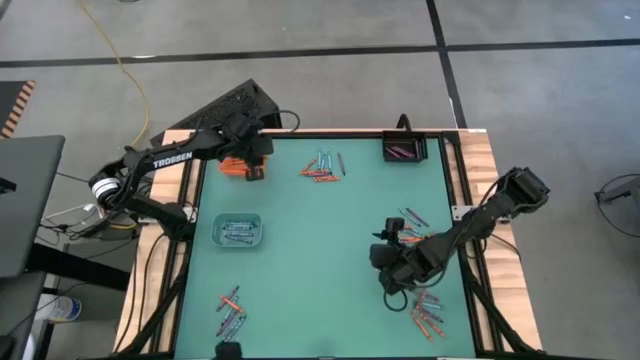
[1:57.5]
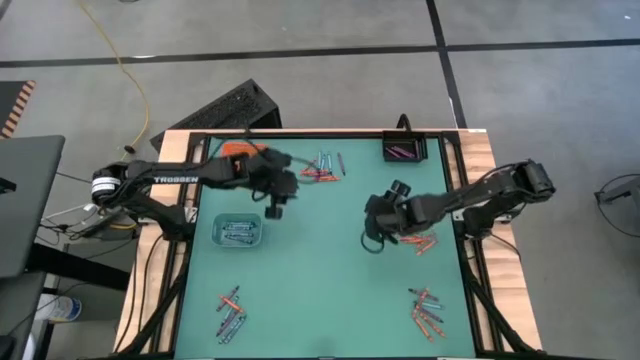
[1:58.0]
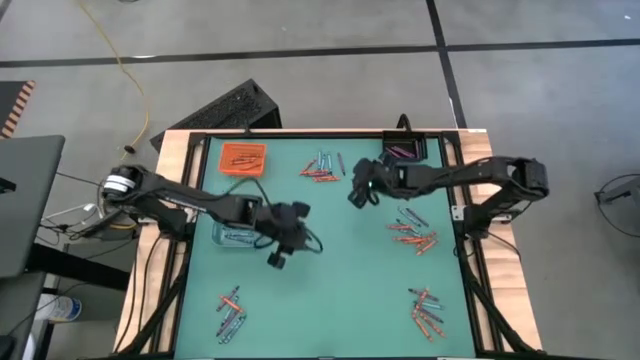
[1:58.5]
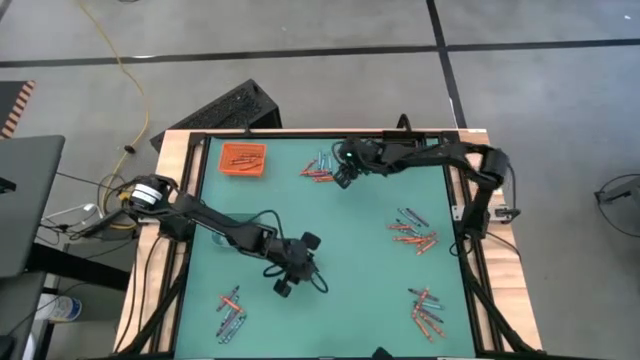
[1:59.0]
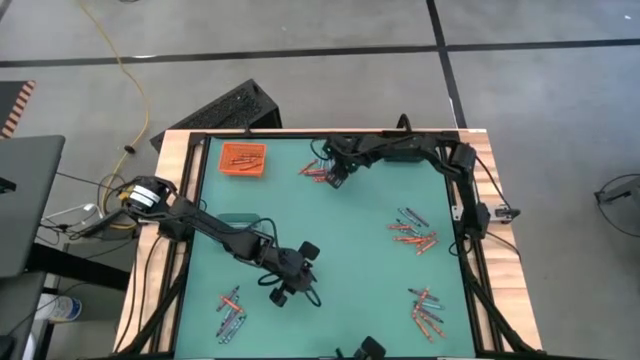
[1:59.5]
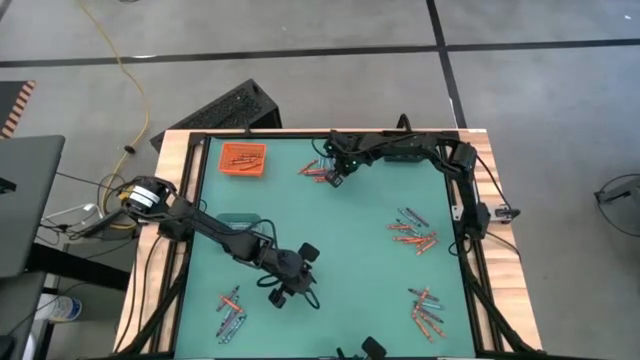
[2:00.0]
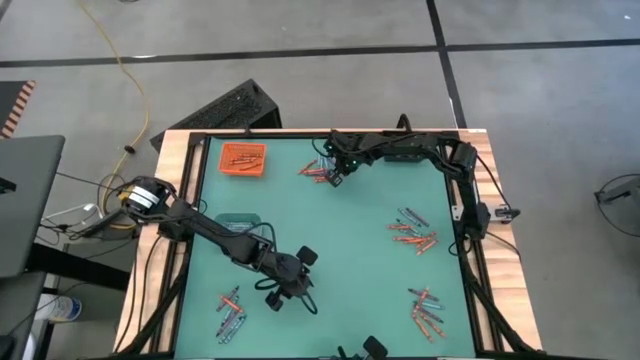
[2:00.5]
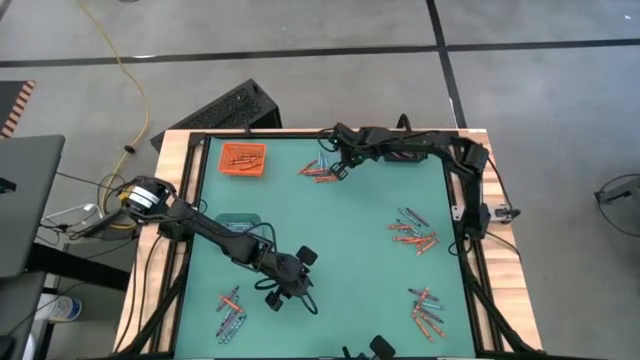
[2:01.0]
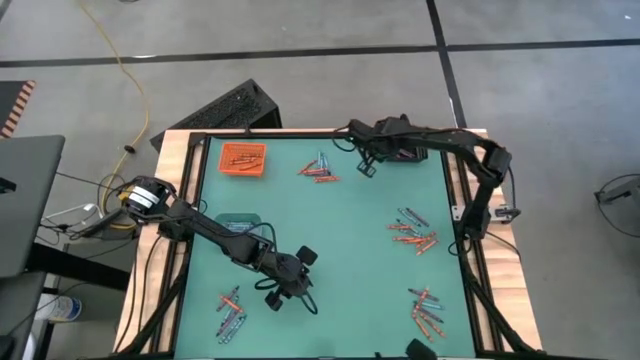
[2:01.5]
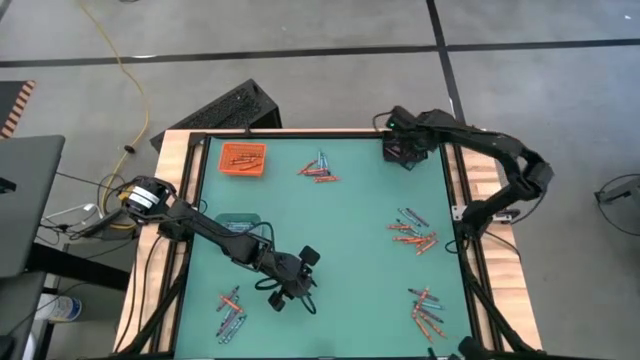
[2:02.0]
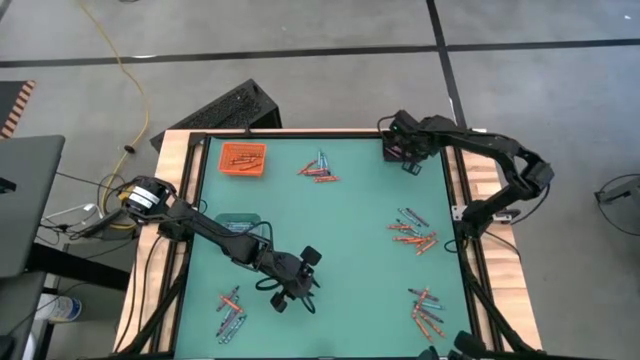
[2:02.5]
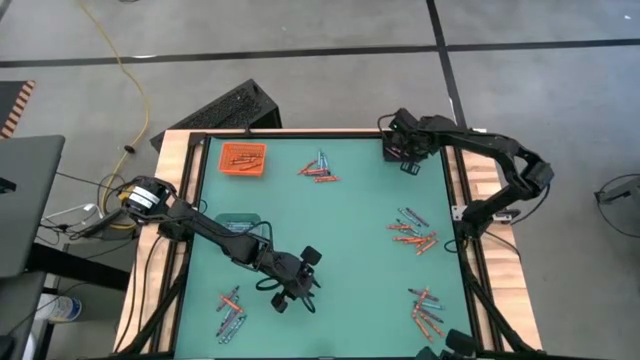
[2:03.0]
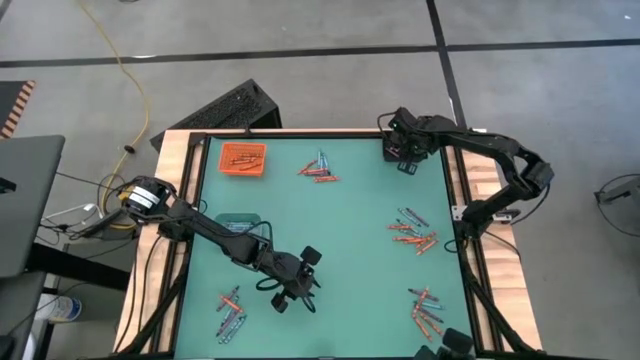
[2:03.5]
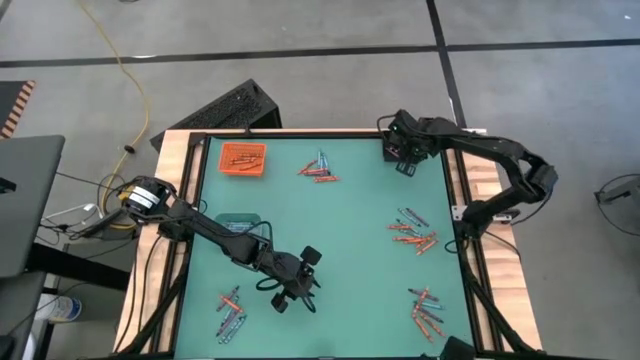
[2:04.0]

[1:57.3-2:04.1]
Task: Sort crayons
Put the purple crayon into the top right black bin

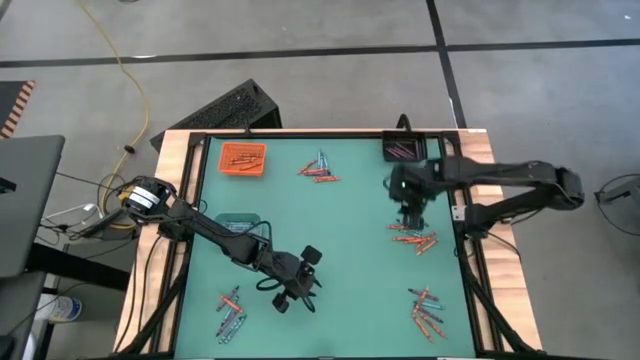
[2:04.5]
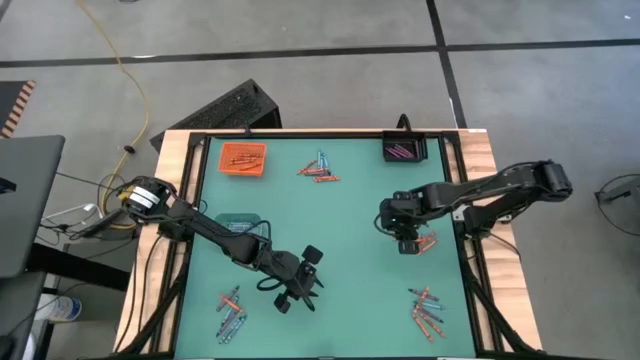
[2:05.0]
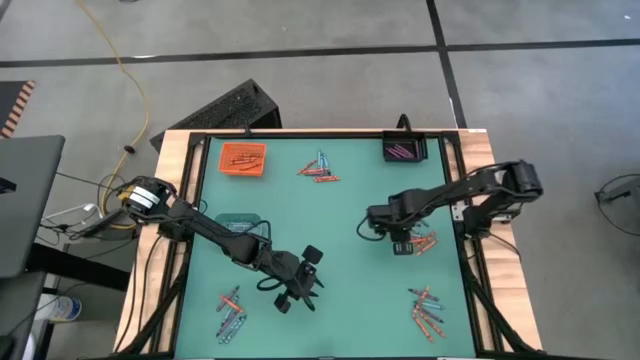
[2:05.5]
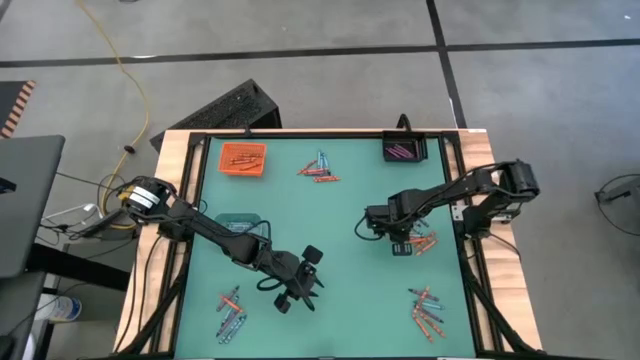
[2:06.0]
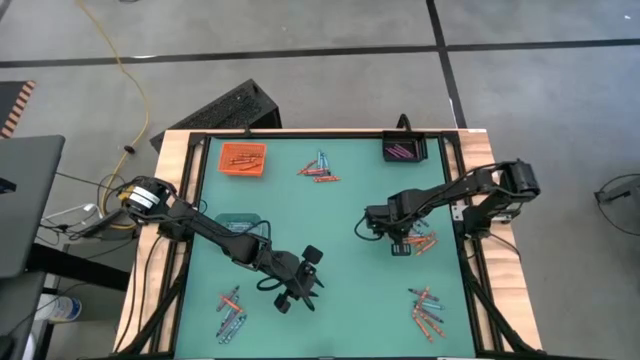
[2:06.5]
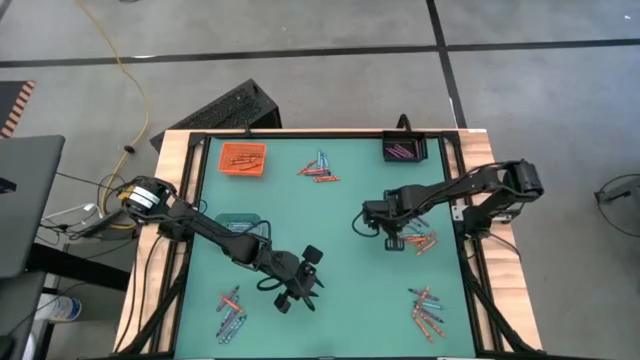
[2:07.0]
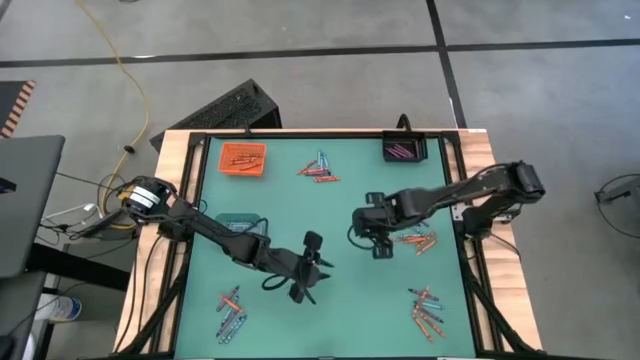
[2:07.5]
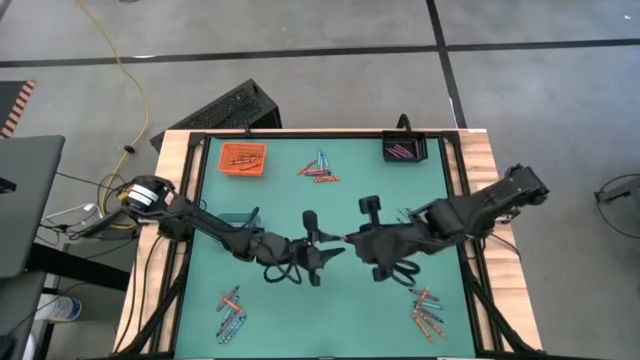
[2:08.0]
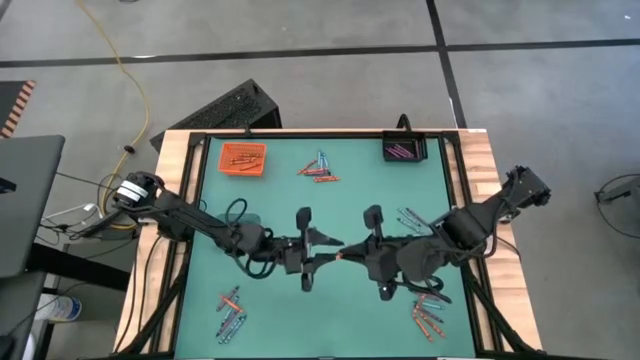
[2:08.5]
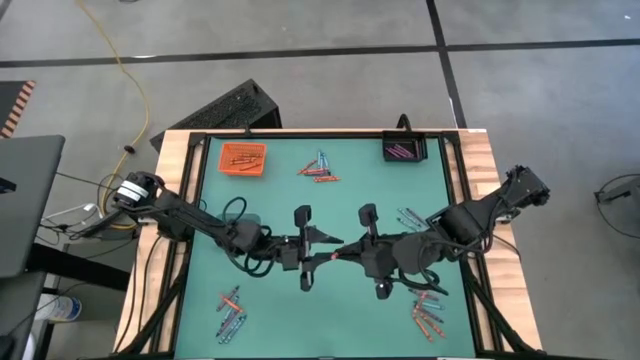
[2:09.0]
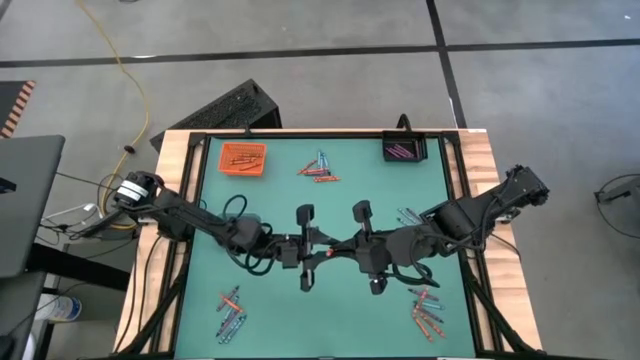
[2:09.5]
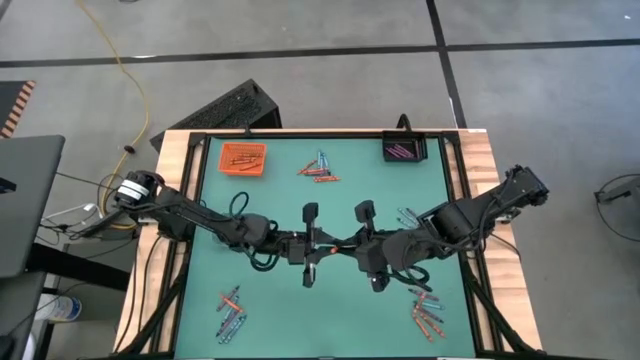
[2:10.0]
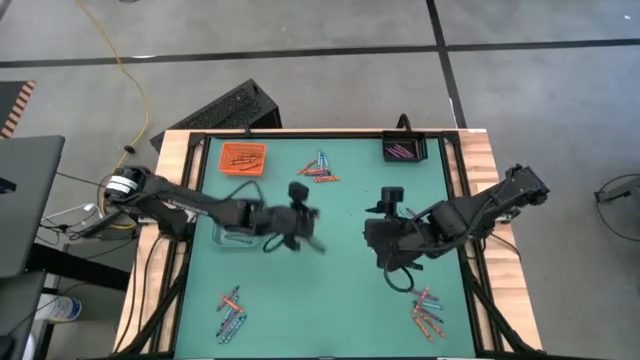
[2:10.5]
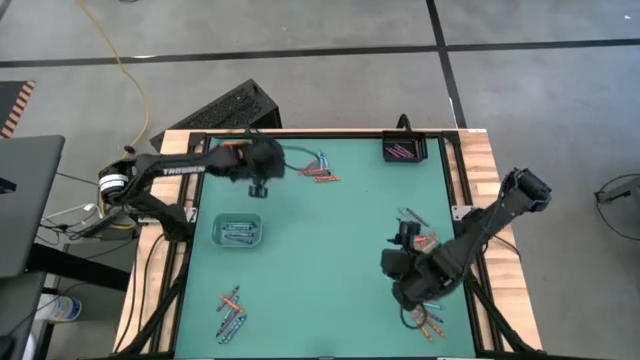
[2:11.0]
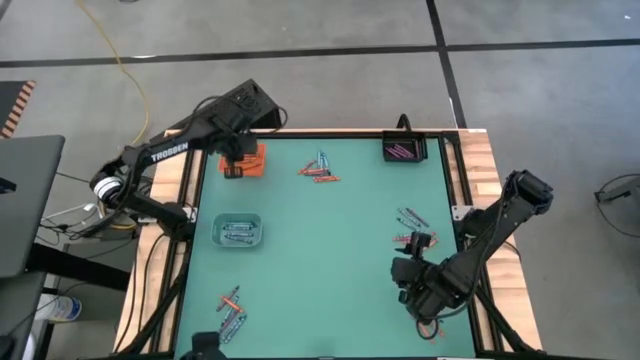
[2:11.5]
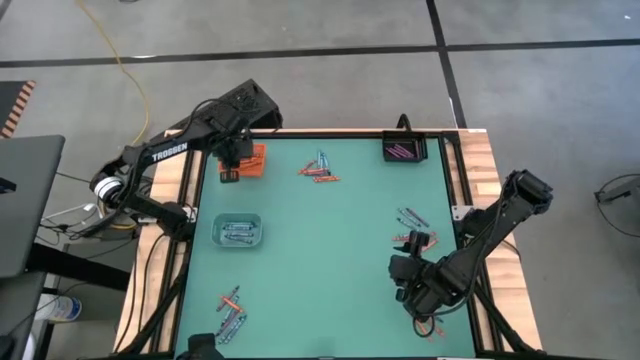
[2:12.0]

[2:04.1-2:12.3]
Put the orange crayon into the orange basket

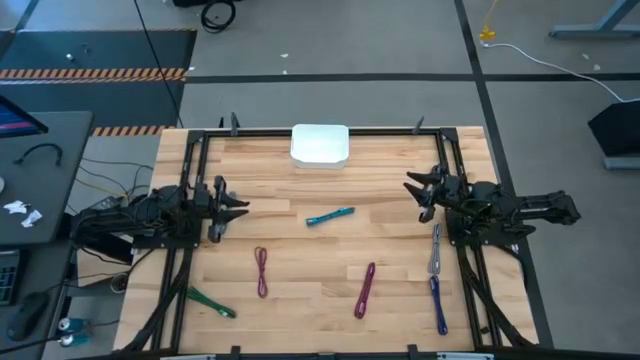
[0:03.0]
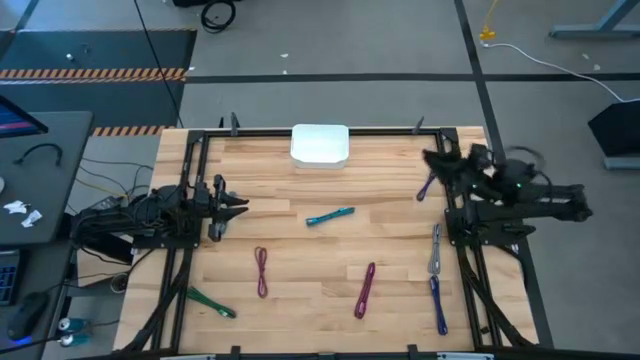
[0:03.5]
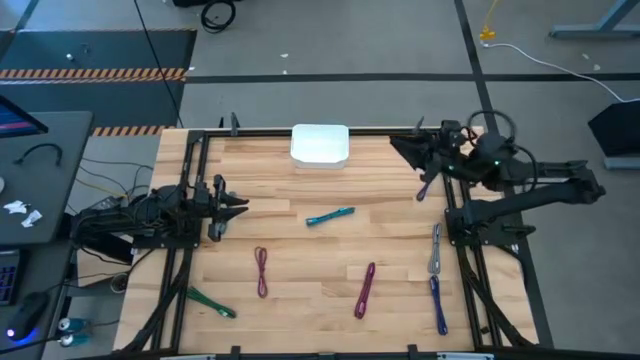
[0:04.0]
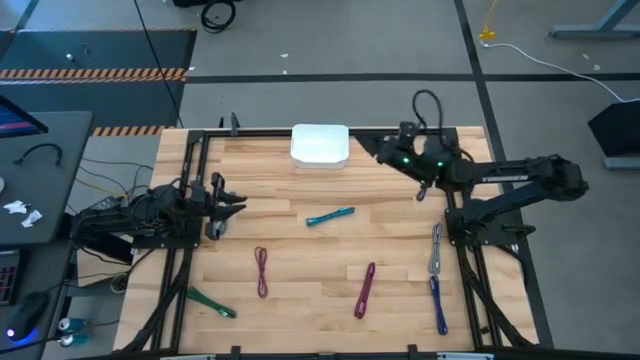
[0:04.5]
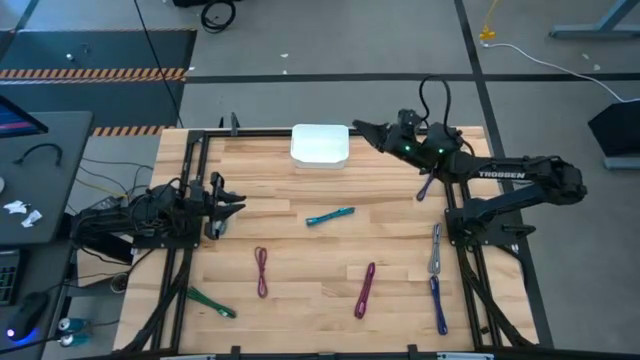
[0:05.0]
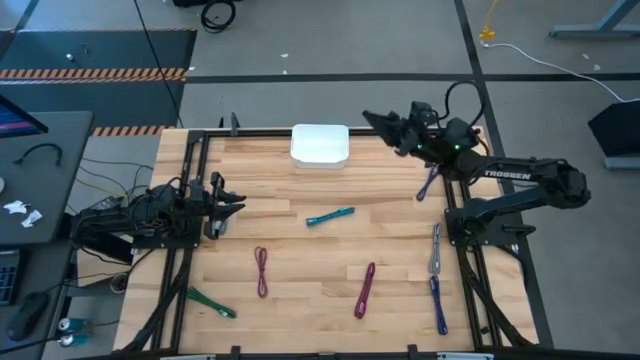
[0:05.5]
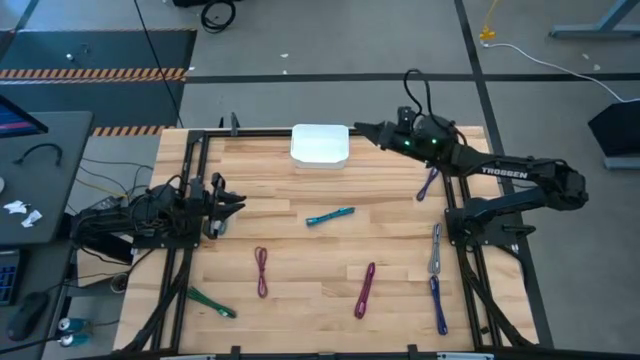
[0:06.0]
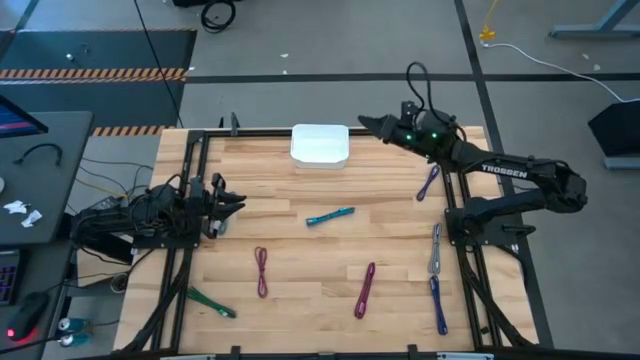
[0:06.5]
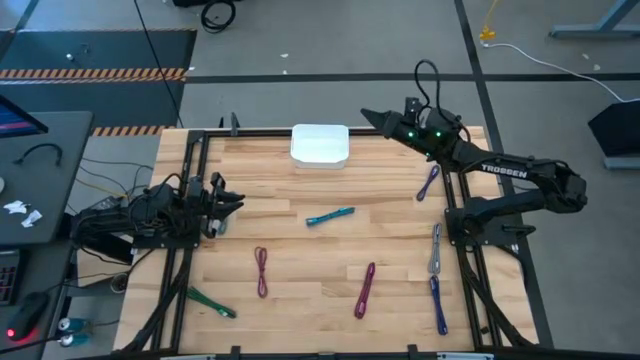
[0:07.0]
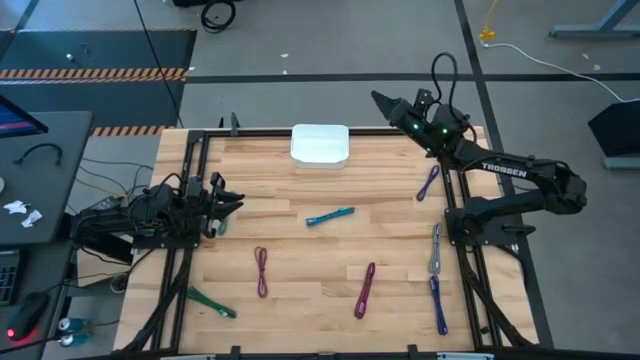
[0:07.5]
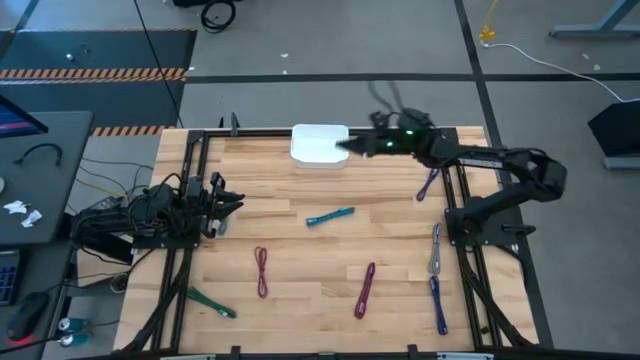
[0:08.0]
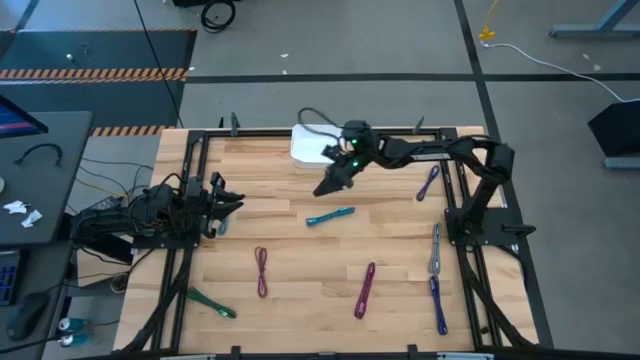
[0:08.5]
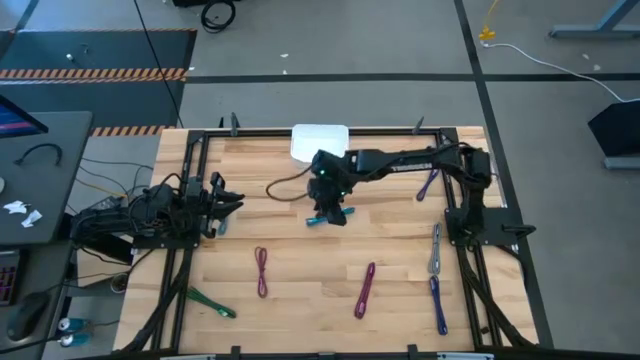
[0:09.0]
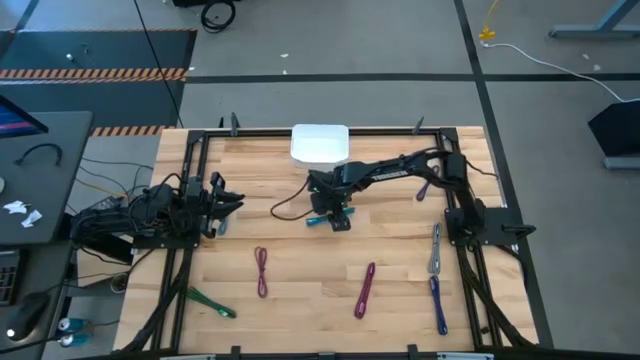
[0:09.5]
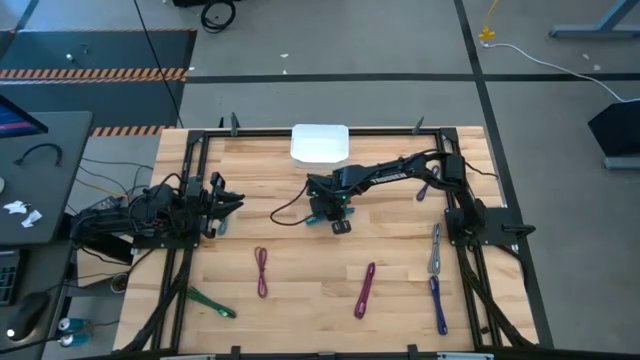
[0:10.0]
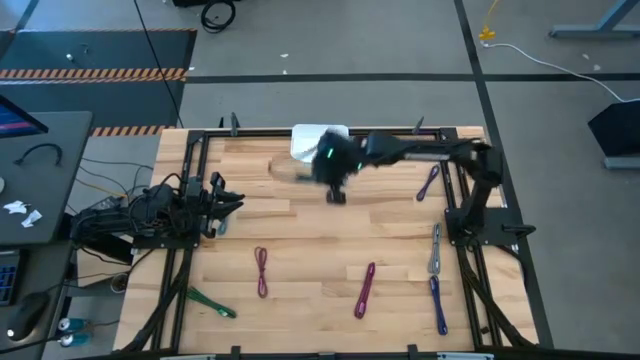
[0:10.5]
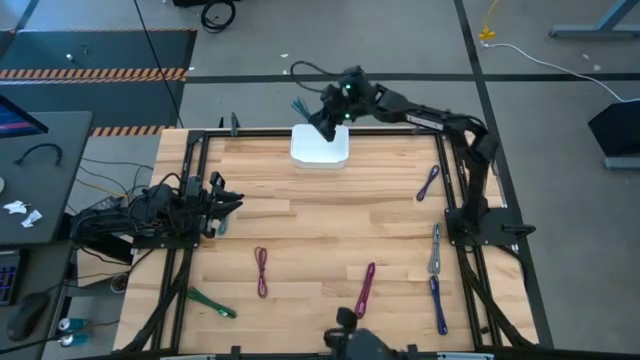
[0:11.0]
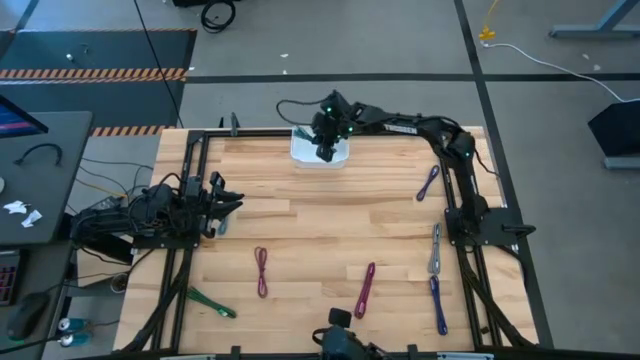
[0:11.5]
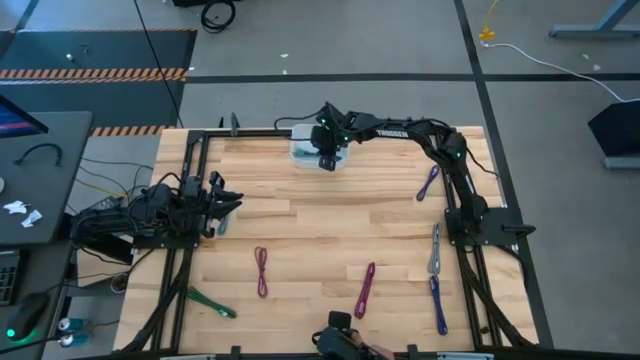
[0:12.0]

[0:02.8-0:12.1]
Task: Pick and place USB-C Cables
Put the right light blue charger cable into the white bin
